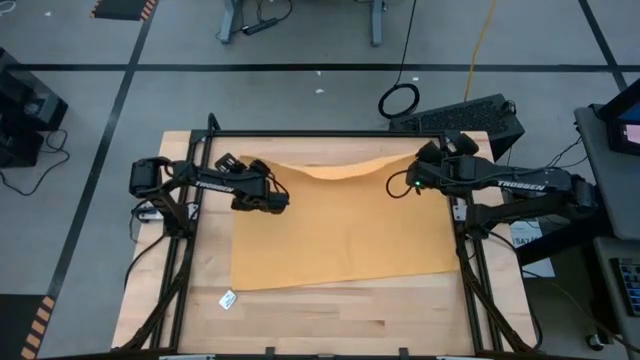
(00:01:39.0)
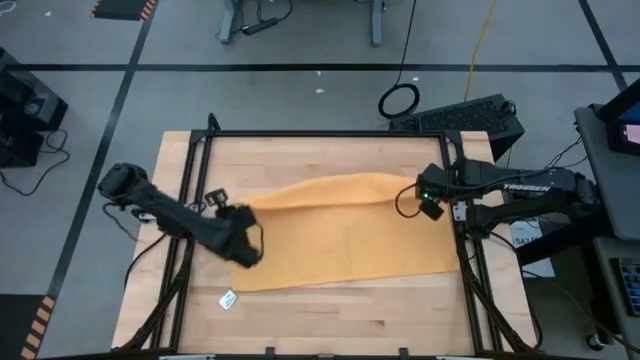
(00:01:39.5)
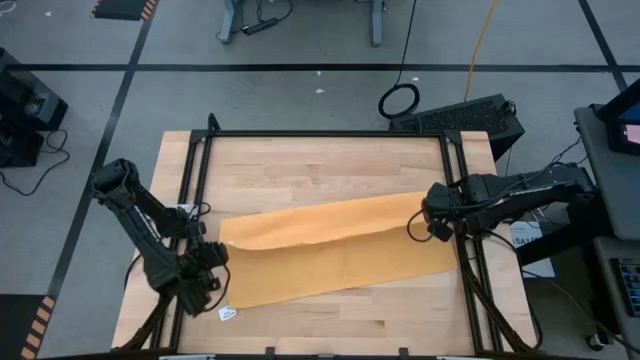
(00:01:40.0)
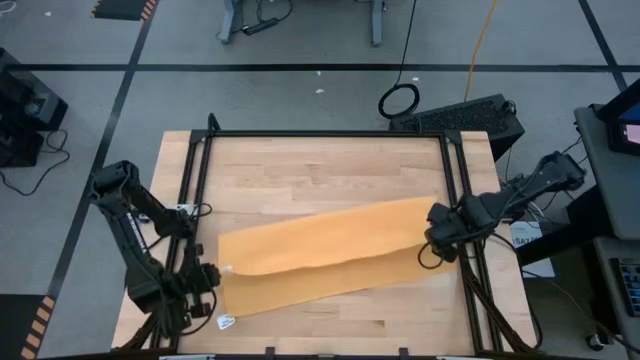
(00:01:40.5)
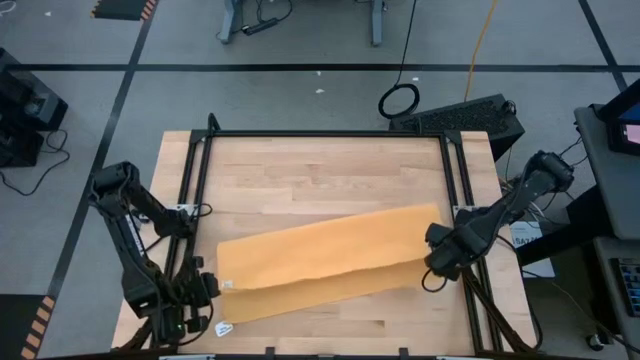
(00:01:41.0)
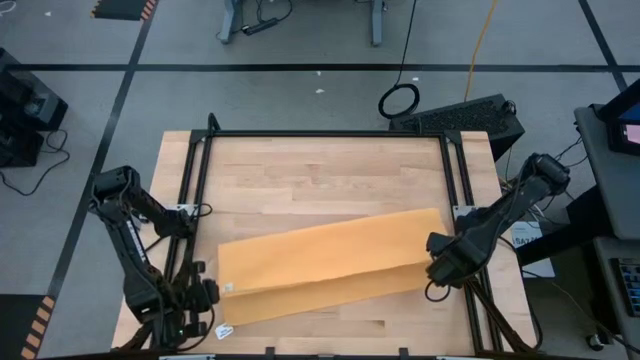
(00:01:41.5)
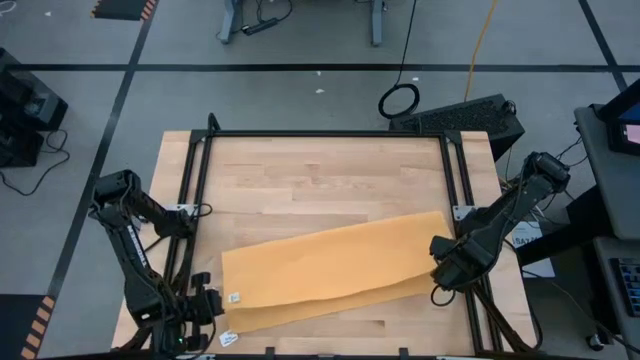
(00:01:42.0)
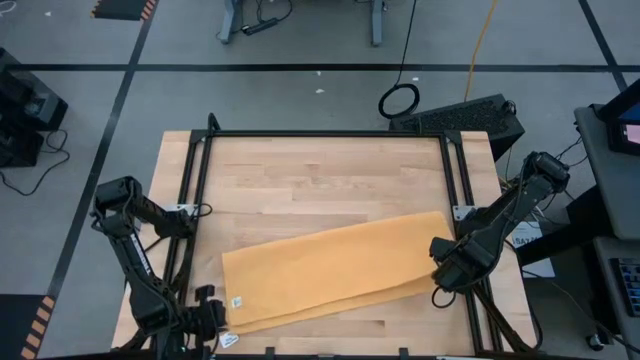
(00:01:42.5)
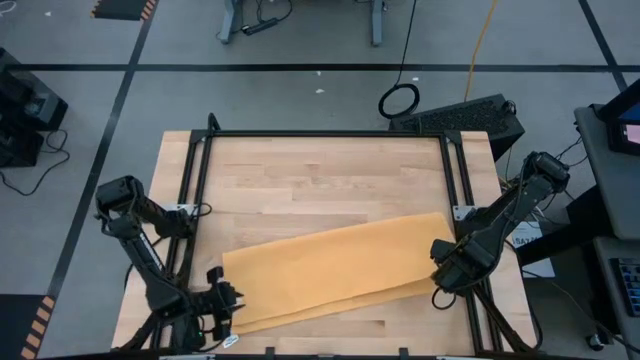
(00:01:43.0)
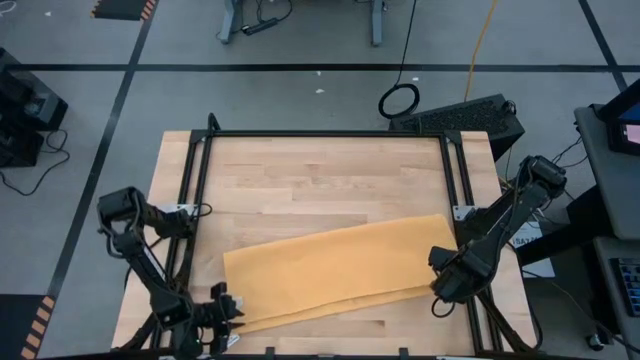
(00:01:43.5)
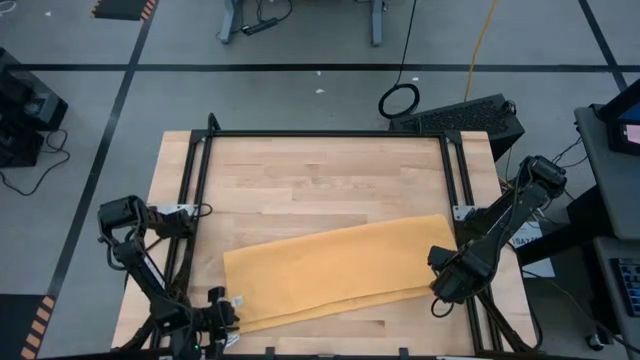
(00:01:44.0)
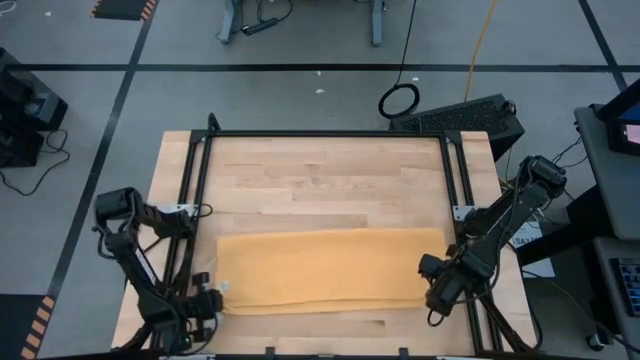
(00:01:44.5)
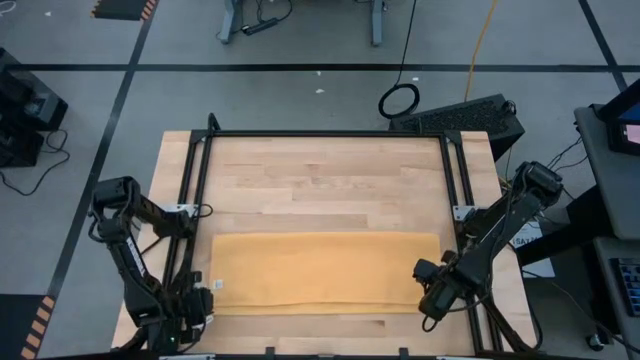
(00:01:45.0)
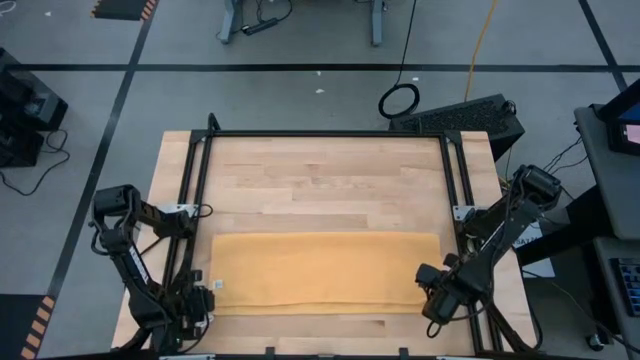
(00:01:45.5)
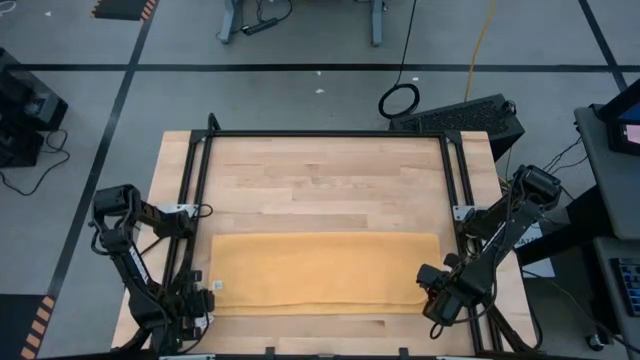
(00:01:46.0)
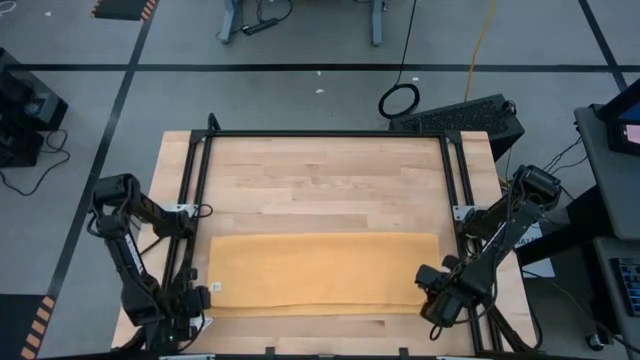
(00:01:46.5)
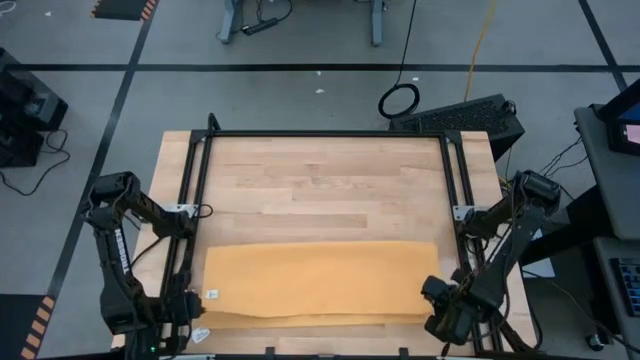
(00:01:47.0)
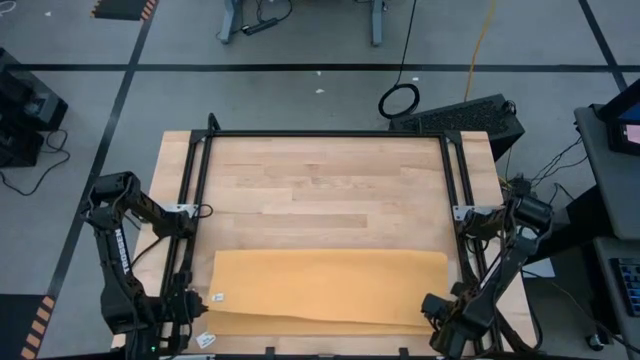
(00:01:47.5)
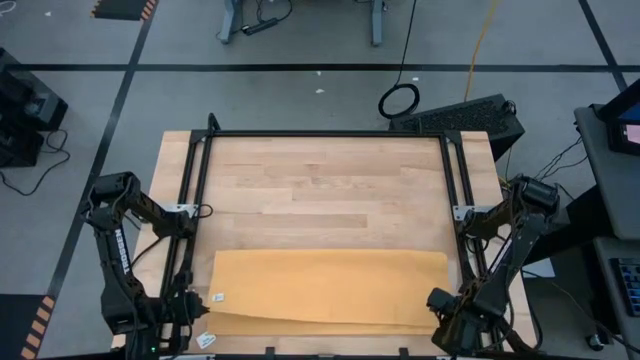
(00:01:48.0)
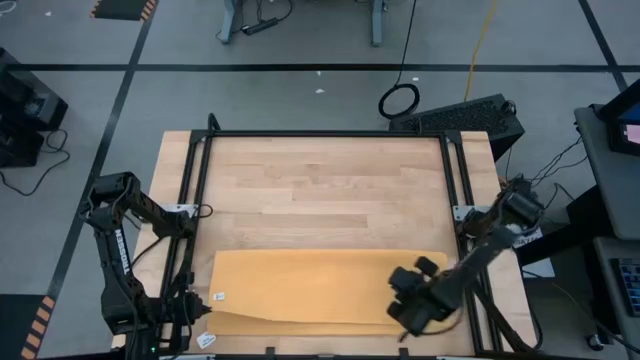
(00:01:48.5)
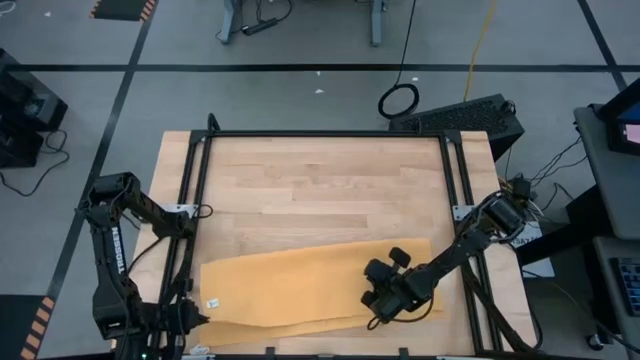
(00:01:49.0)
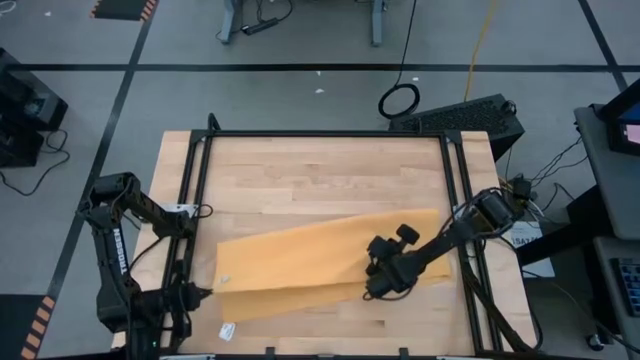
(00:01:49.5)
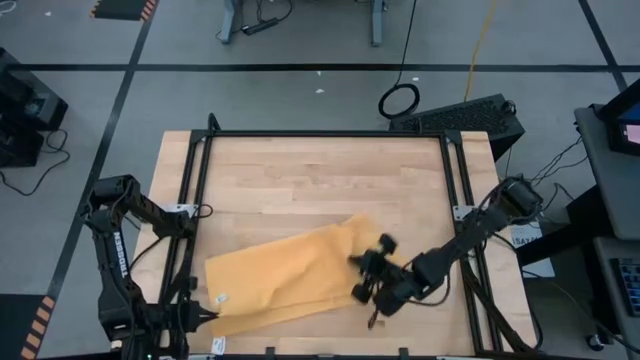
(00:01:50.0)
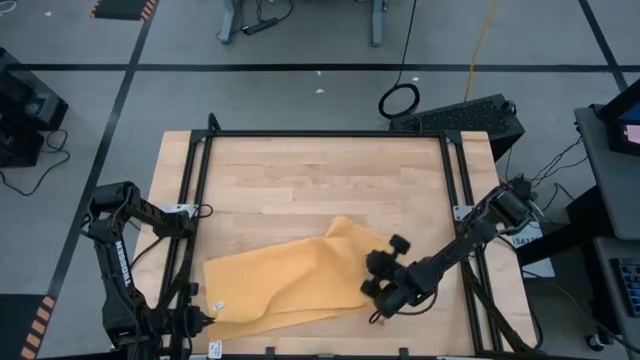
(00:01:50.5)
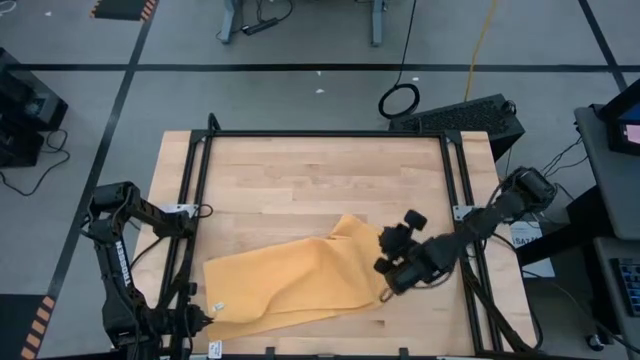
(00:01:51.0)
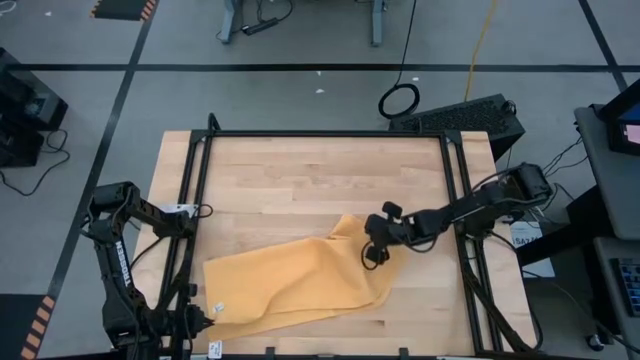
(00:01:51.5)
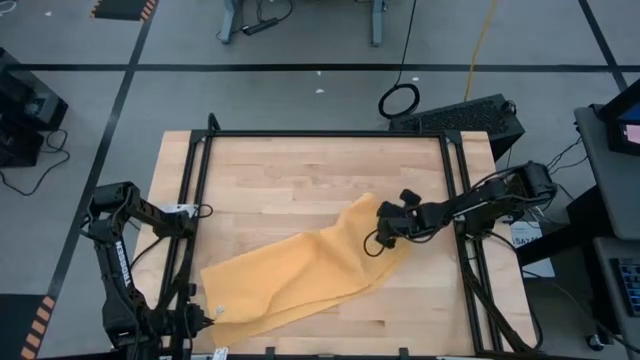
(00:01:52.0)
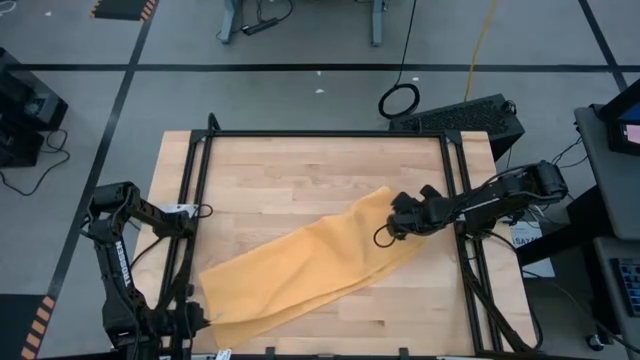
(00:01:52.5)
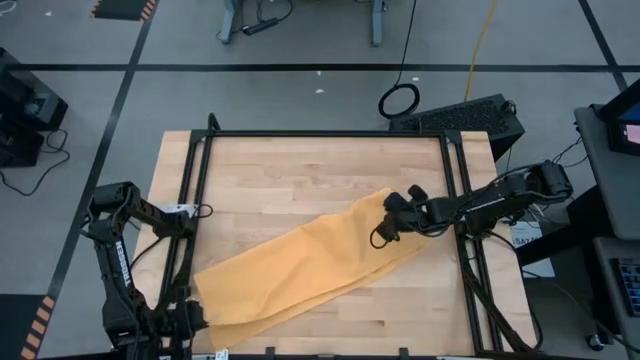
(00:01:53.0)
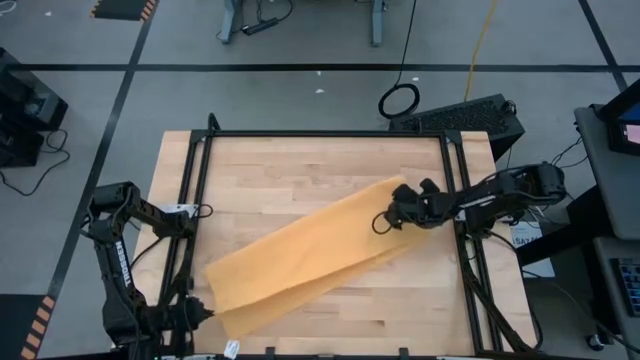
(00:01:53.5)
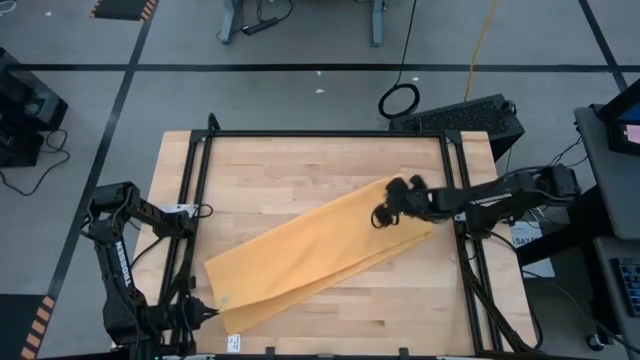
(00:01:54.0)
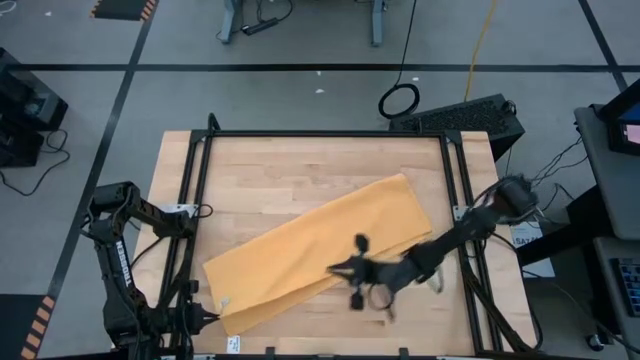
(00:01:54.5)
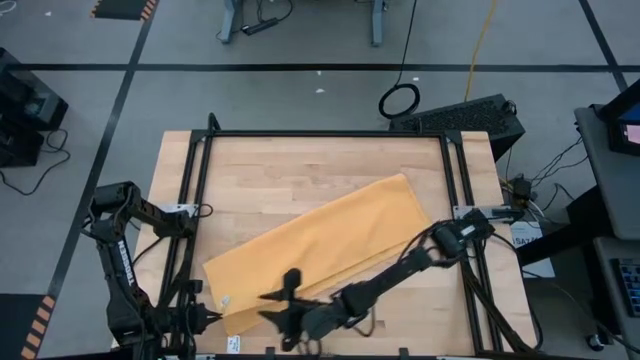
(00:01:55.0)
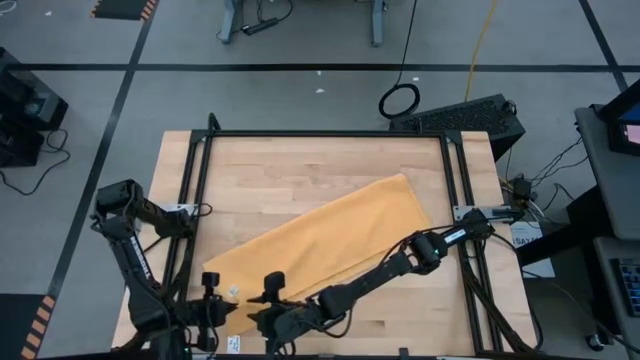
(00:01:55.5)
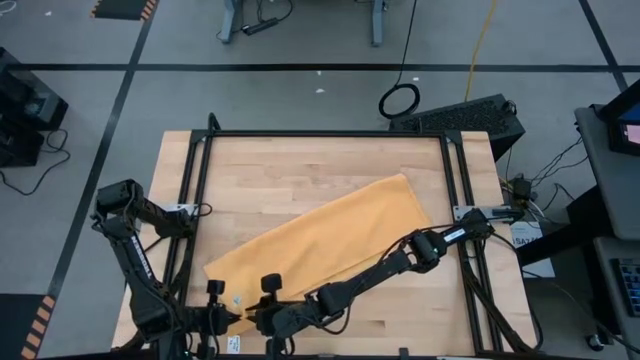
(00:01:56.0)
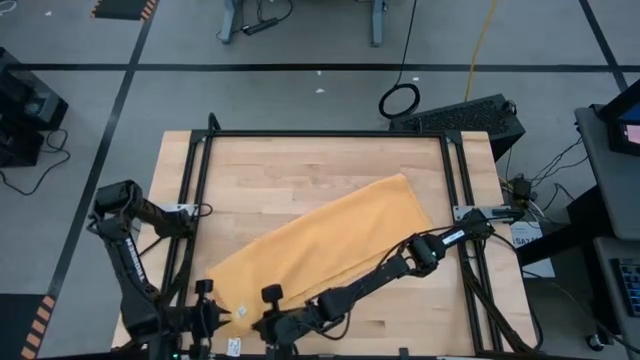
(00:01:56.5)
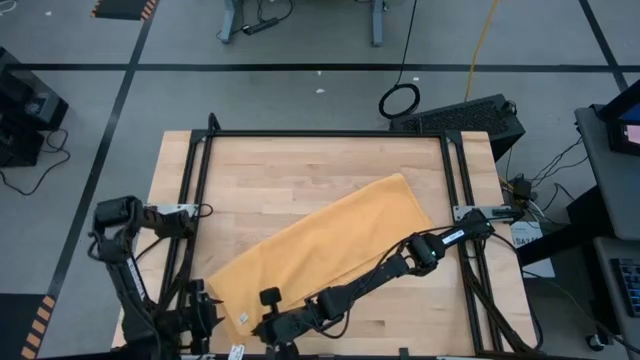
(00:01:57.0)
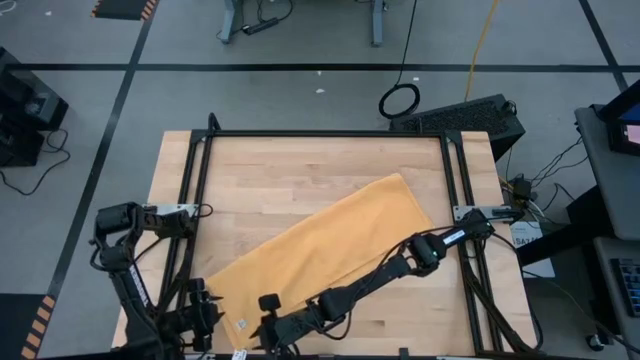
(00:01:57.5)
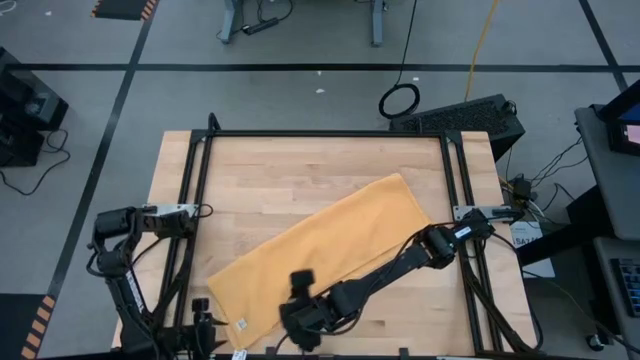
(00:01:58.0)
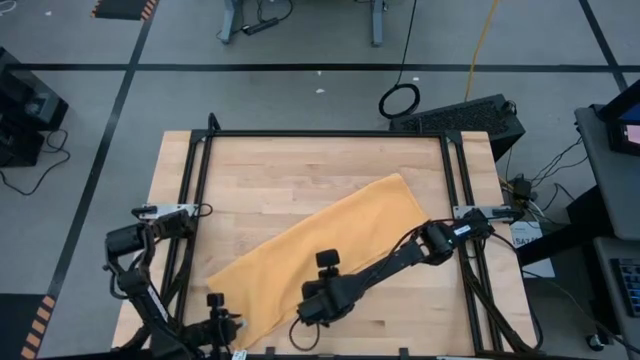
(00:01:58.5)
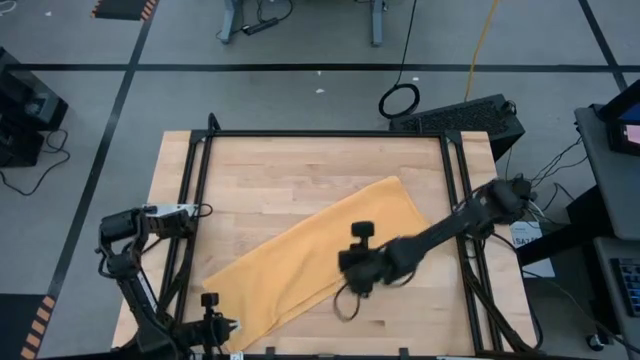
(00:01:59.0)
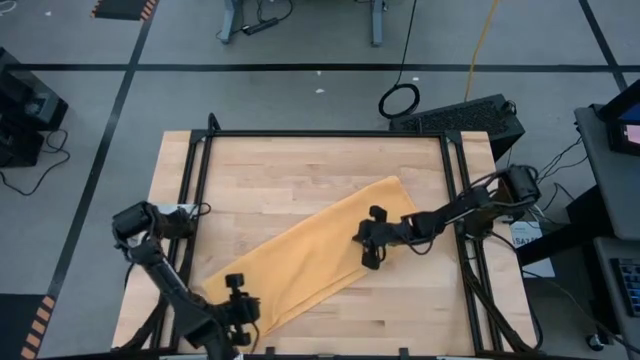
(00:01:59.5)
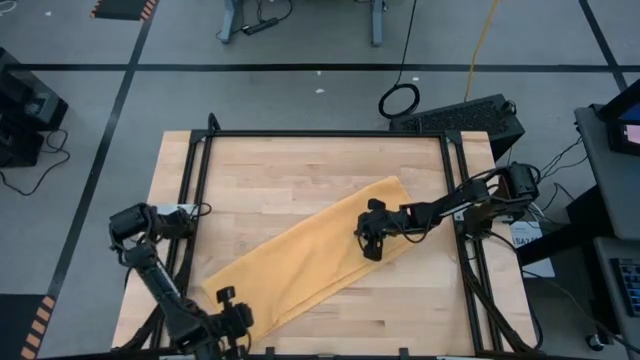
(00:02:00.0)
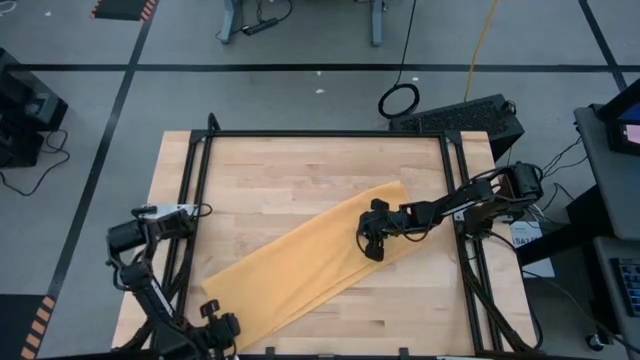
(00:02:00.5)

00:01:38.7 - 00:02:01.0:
Task: Roll towel
Roll the yellow towel
